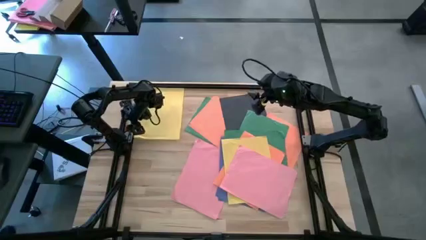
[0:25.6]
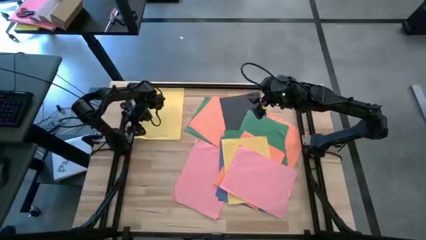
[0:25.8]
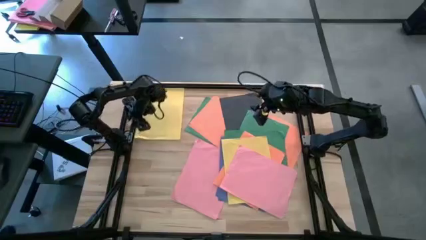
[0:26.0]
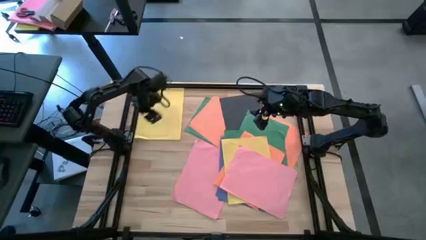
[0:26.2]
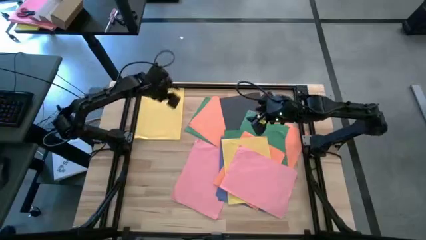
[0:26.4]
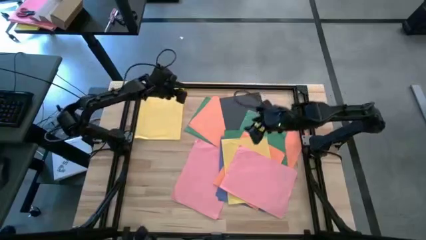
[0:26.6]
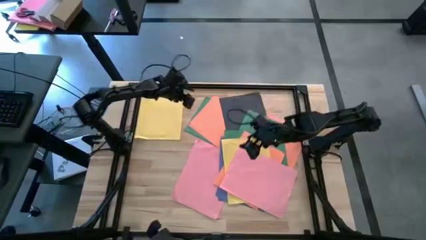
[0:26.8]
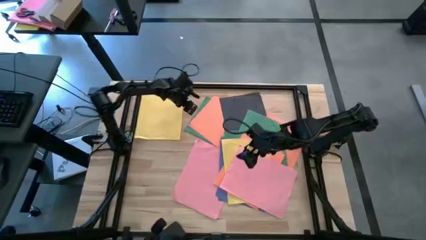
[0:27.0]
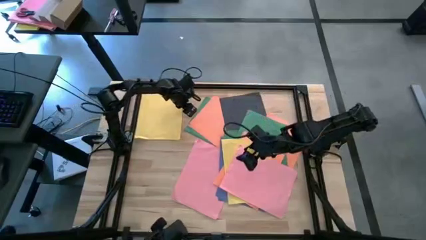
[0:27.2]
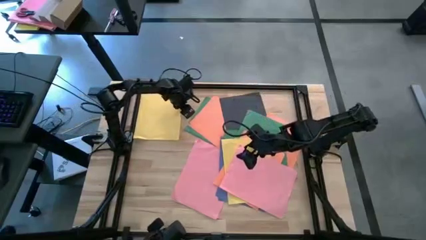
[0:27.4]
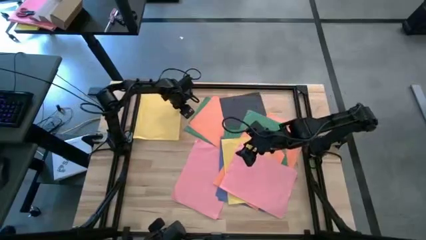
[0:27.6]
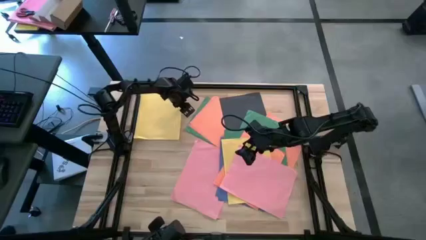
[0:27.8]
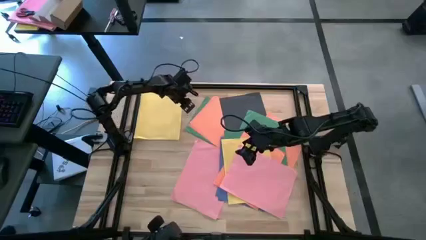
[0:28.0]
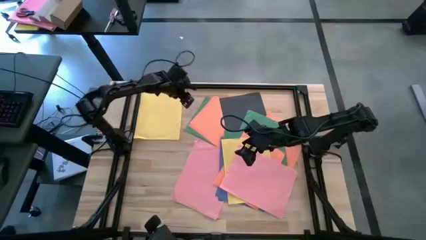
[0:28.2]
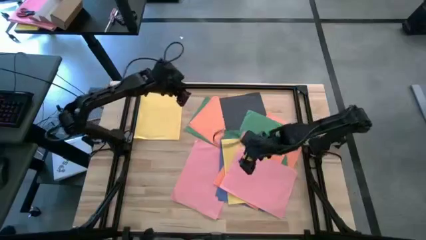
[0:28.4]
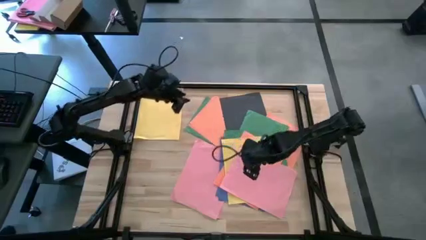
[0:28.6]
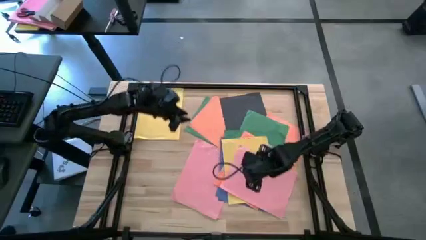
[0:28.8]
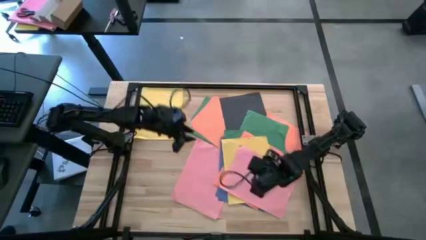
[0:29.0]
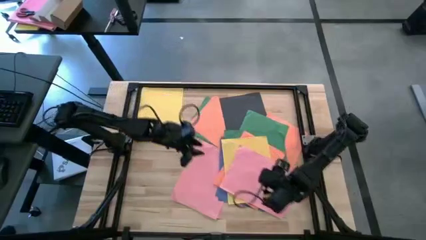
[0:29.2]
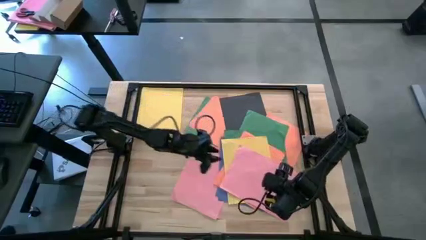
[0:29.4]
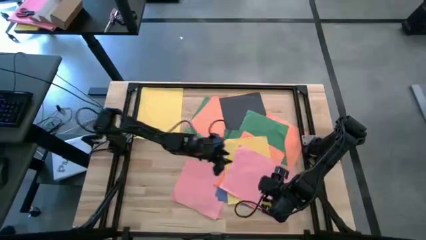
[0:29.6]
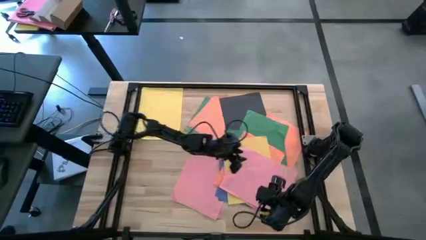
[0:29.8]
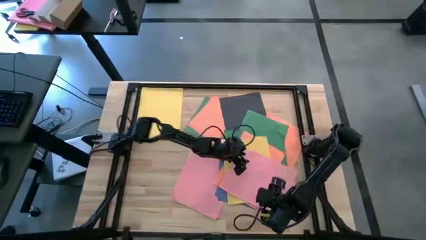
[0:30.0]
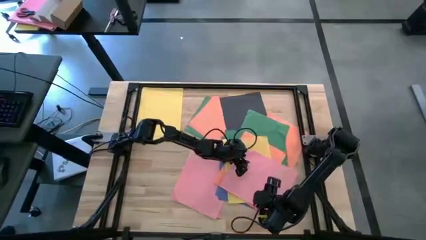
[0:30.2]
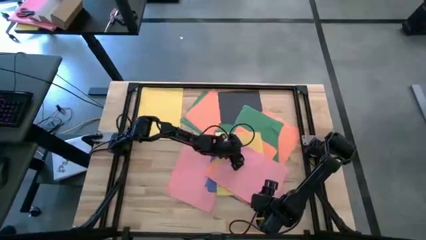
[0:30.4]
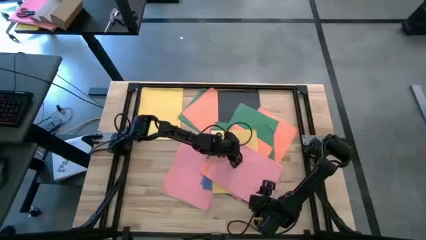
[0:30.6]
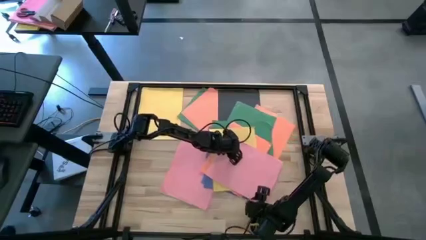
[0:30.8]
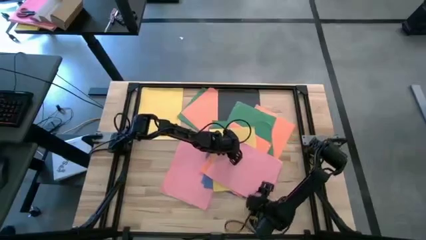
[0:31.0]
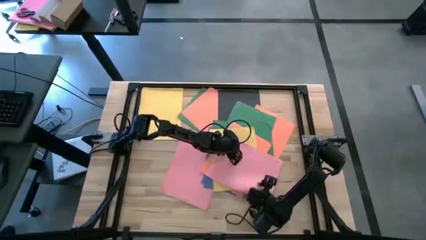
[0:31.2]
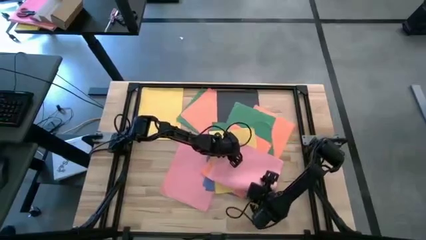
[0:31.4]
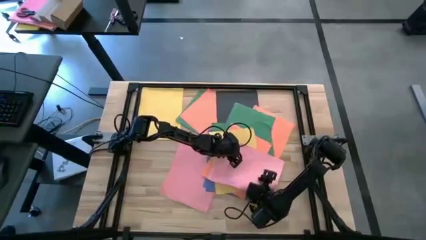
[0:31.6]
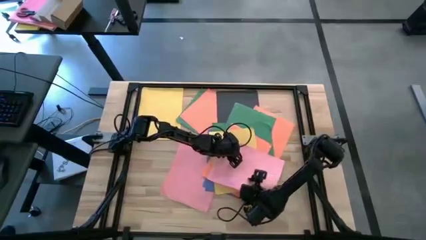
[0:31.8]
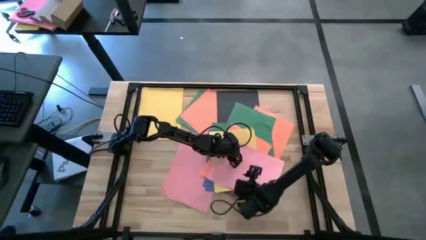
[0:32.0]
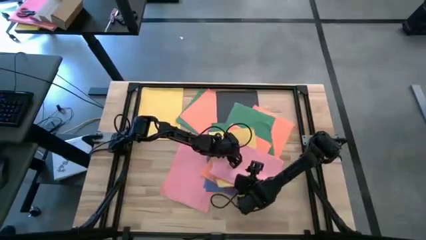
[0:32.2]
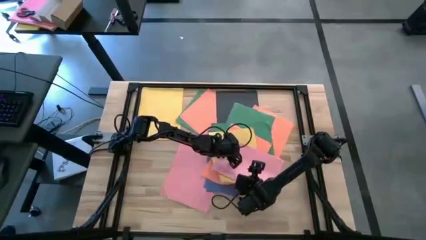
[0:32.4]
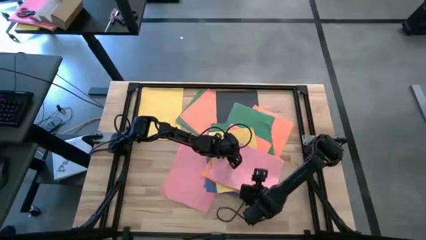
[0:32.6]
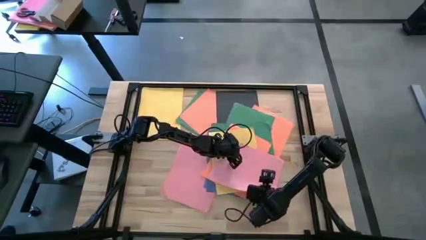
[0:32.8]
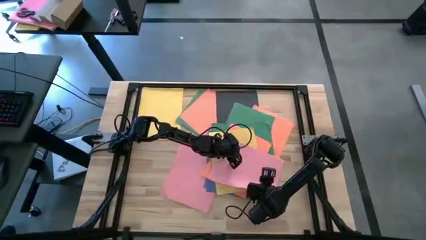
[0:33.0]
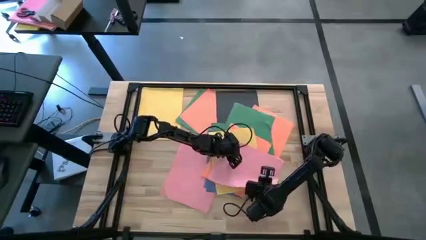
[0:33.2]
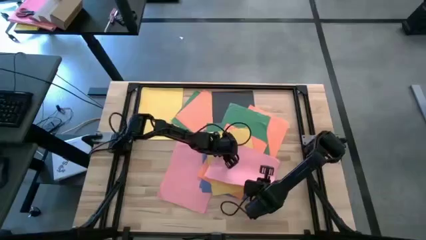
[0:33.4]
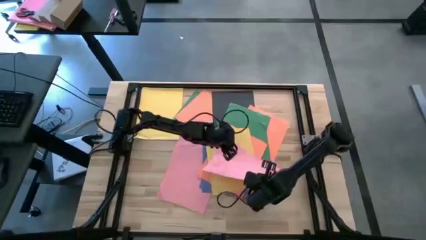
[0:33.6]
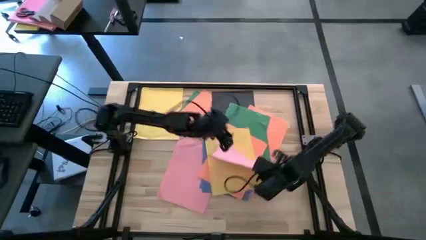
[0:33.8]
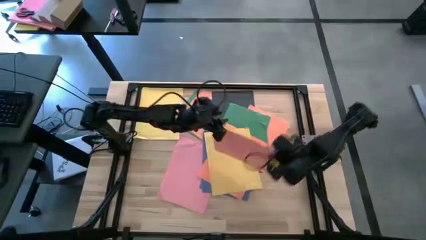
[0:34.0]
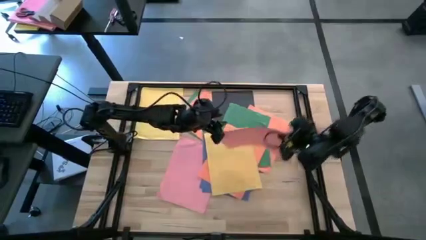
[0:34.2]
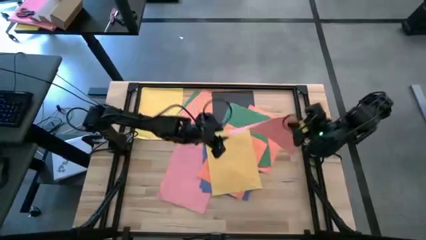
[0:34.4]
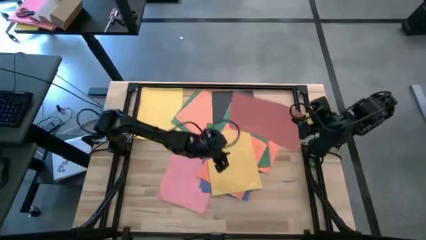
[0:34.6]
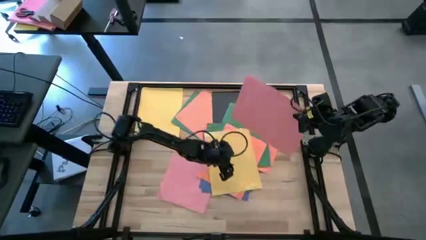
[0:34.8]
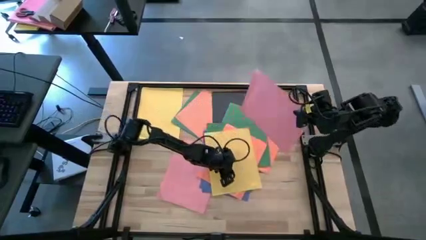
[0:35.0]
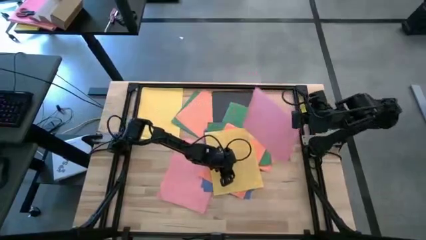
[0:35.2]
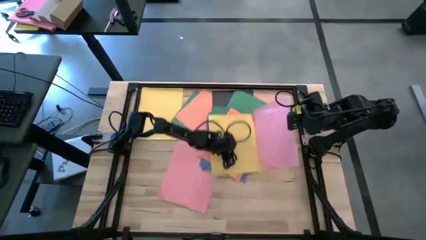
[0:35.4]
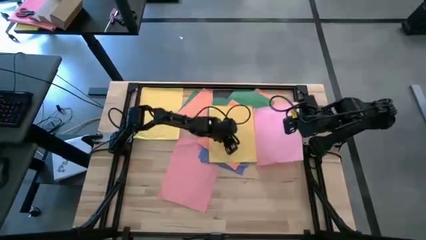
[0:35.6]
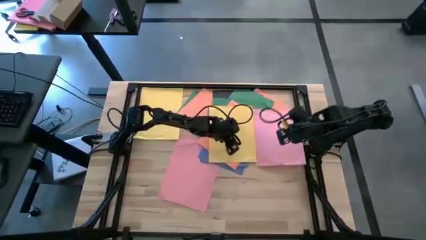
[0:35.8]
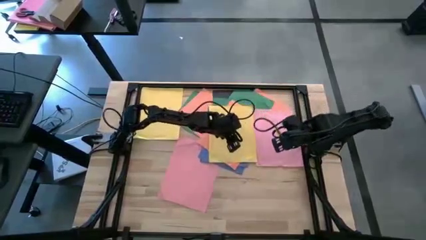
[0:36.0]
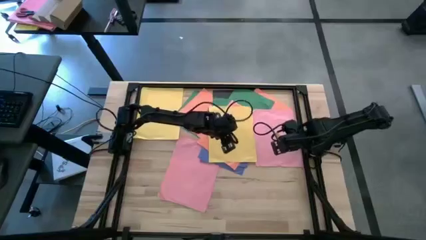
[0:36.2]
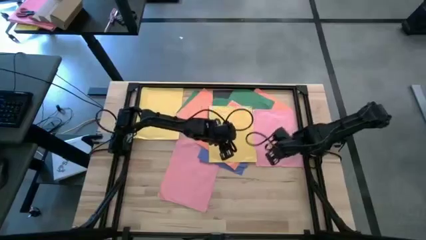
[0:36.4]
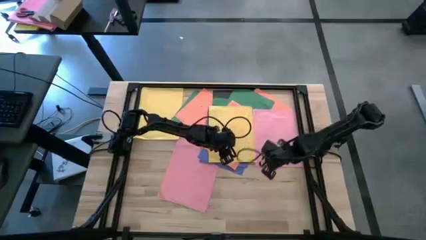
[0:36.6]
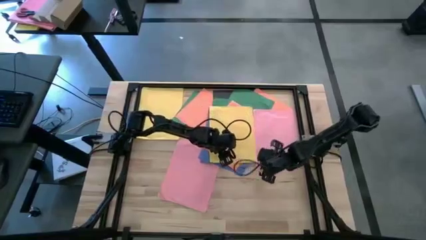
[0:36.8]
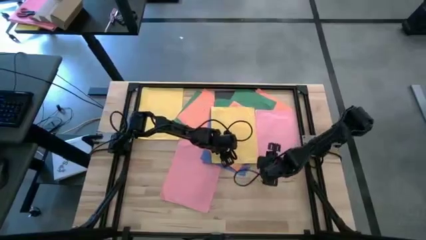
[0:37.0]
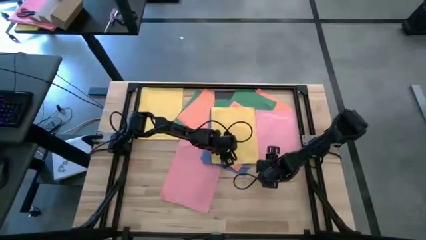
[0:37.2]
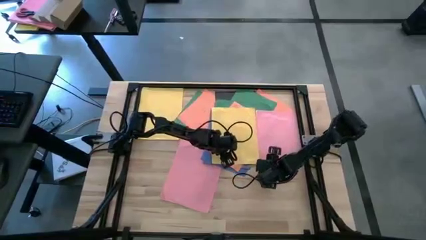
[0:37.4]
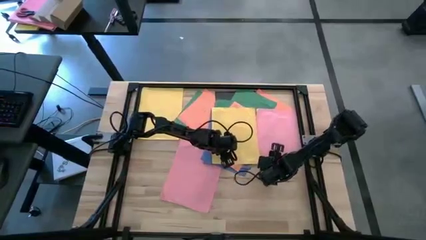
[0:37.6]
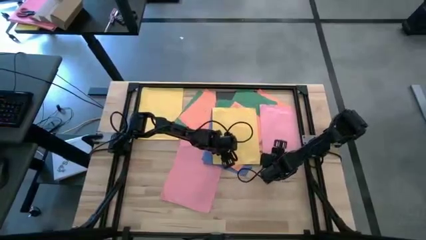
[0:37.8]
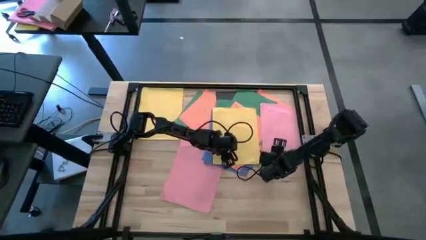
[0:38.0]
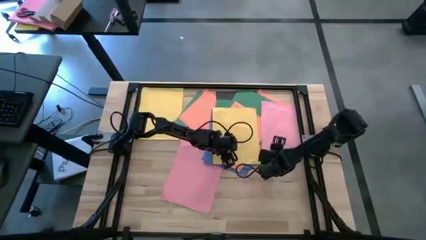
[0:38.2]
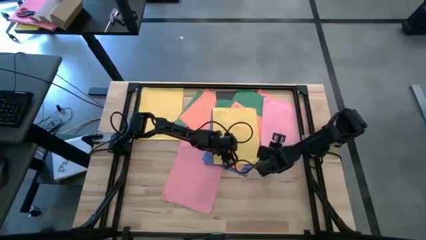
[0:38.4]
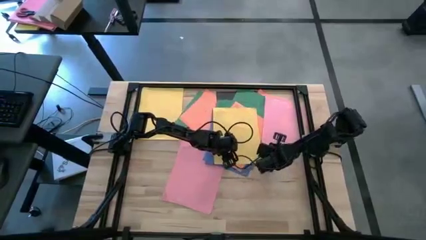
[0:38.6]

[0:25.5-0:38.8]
Task: Organize paper
Move the pink paper to the bottom right of the table

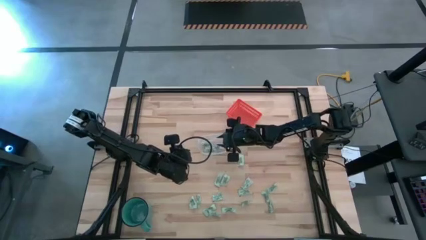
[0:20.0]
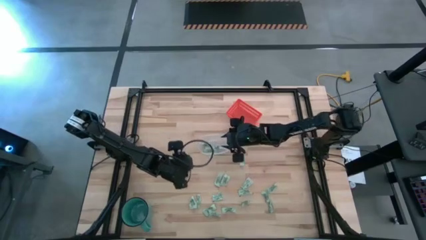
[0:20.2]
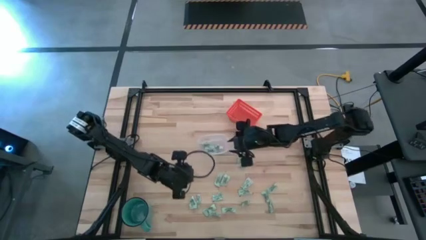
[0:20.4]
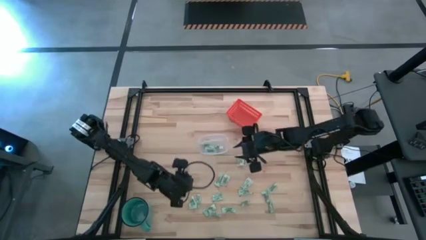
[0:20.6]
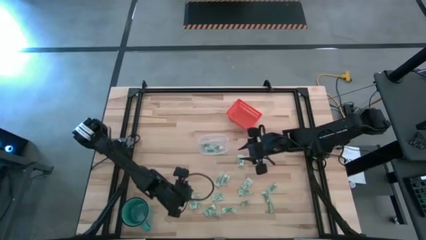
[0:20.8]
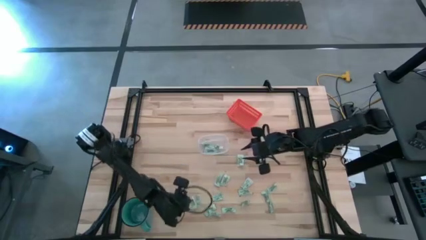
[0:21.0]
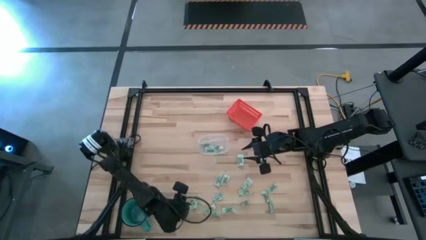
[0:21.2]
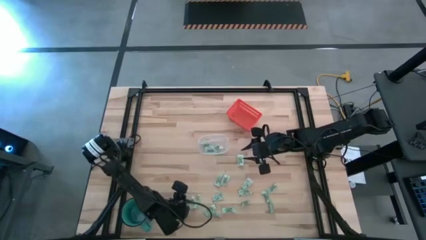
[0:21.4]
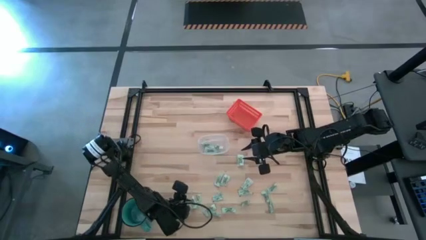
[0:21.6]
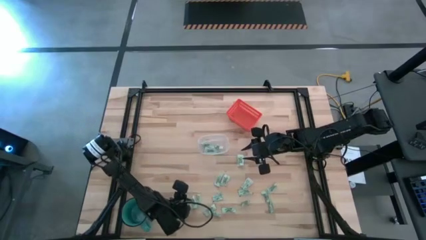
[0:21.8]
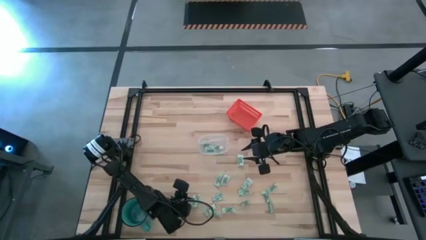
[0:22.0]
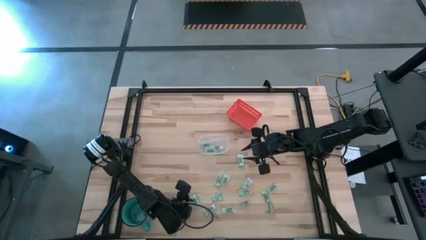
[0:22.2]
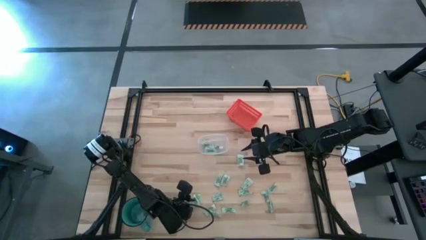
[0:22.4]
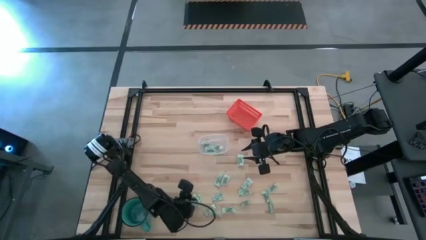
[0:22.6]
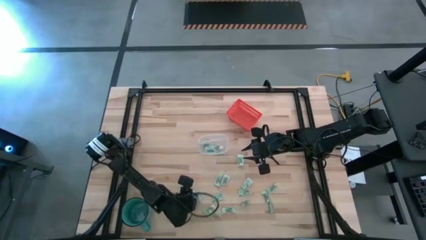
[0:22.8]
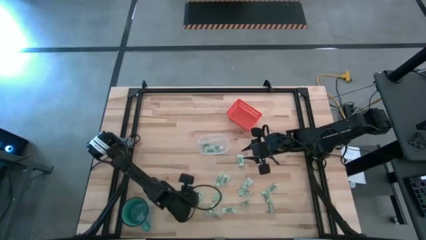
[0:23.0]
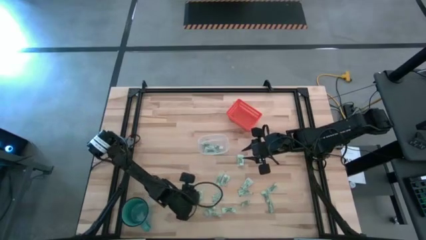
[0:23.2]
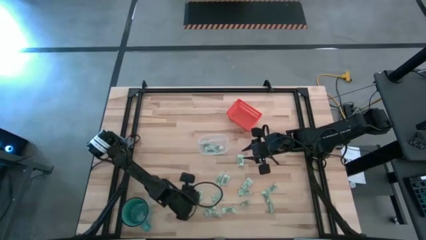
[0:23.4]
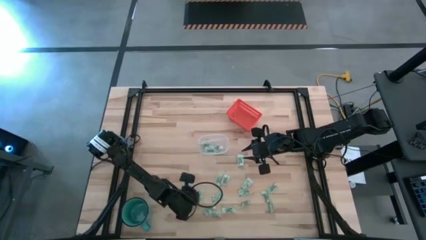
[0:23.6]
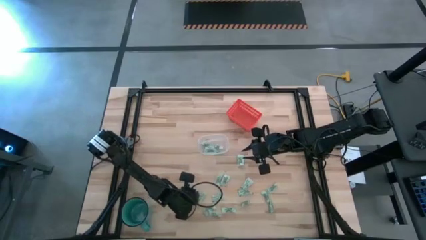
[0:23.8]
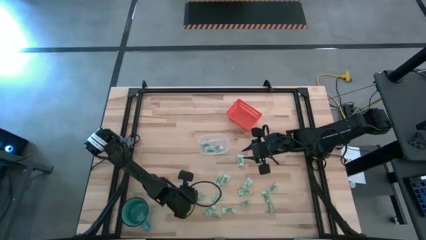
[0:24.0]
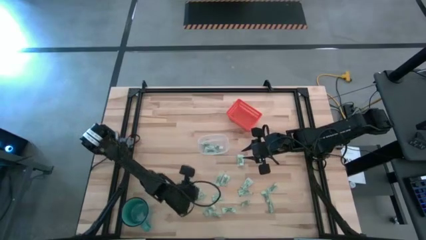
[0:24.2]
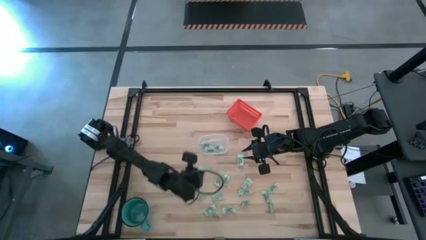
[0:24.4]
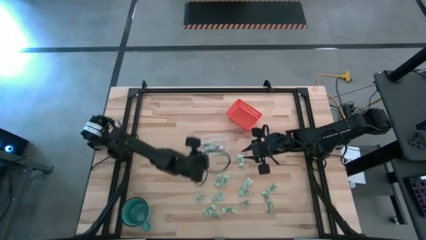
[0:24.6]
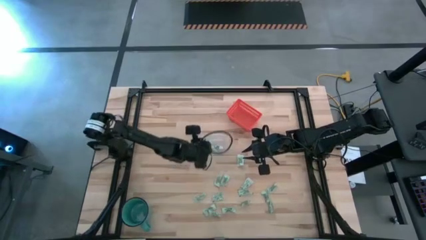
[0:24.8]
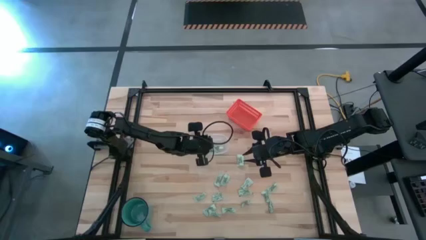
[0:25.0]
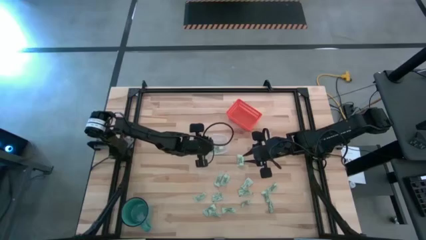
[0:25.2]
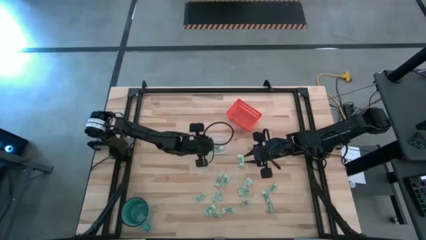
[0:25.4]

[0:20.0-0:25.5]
Task: Pick and place items into bin
Put the stevia packet into the transparent bin
